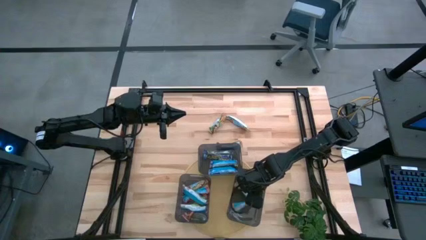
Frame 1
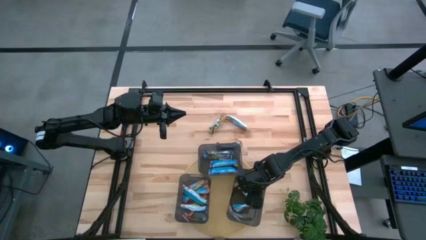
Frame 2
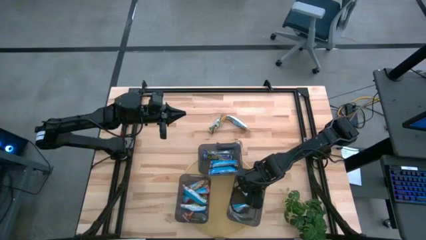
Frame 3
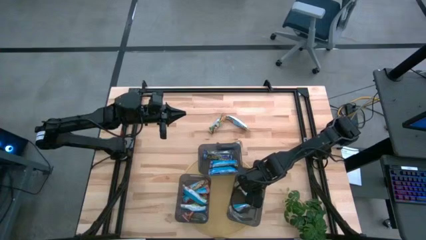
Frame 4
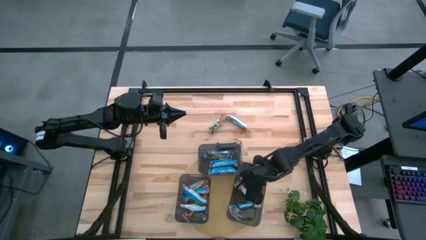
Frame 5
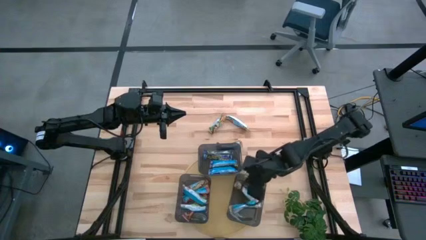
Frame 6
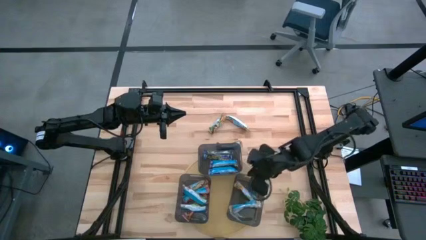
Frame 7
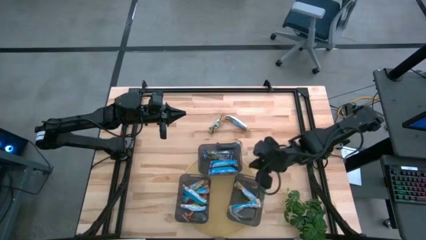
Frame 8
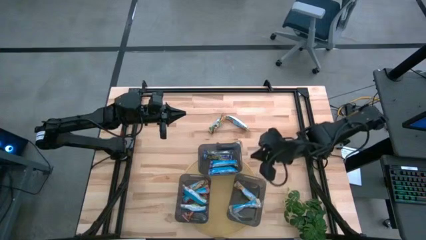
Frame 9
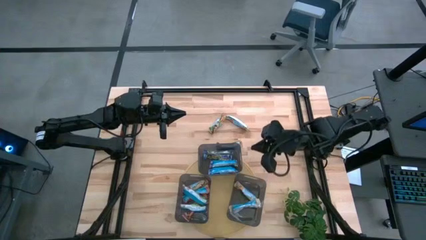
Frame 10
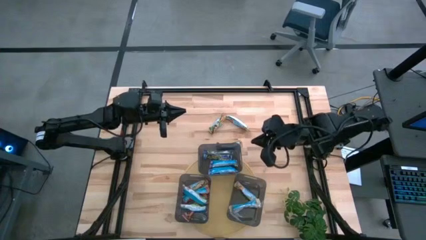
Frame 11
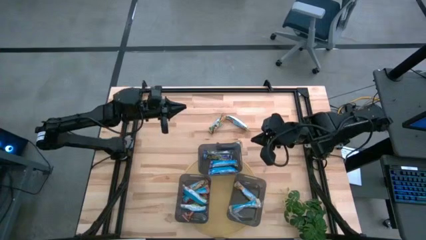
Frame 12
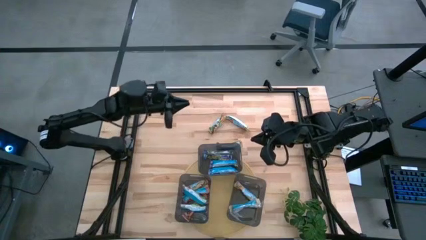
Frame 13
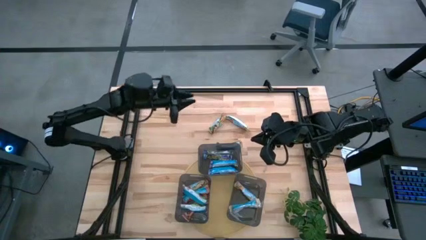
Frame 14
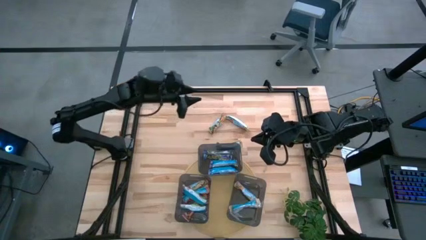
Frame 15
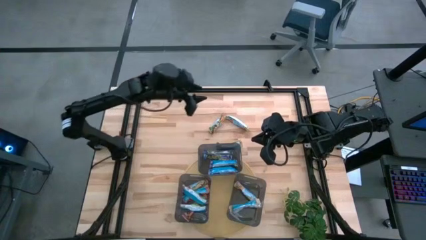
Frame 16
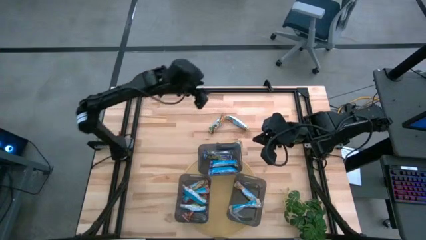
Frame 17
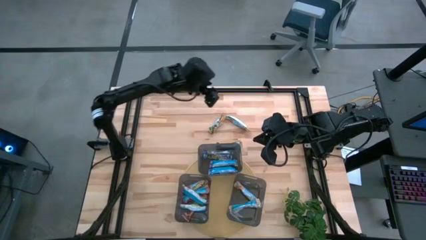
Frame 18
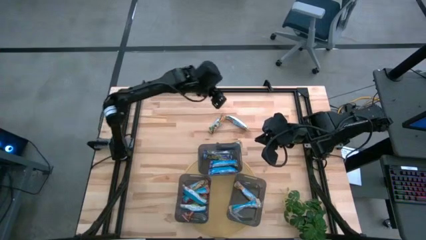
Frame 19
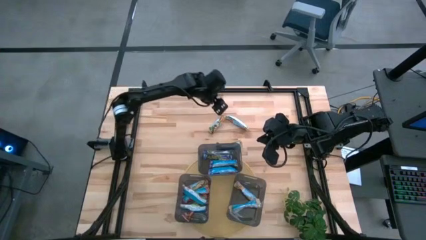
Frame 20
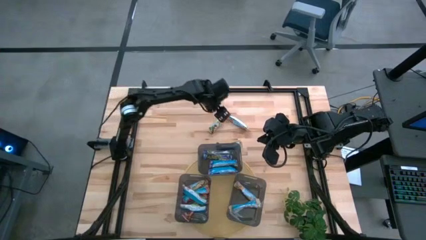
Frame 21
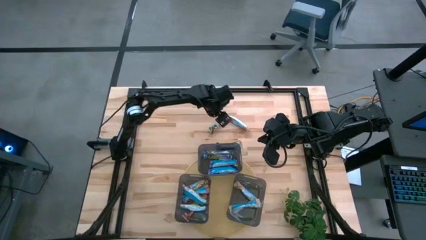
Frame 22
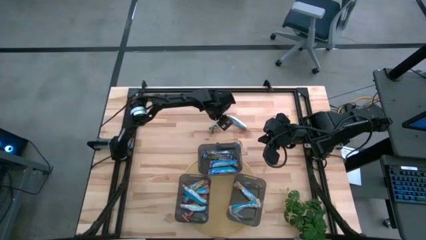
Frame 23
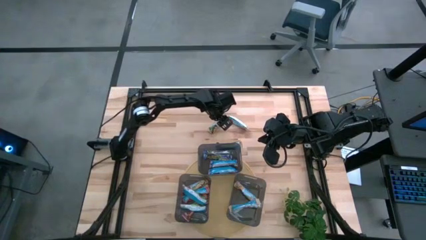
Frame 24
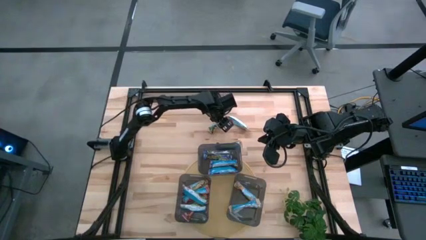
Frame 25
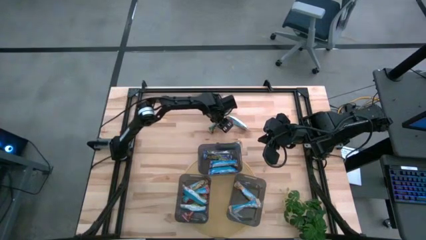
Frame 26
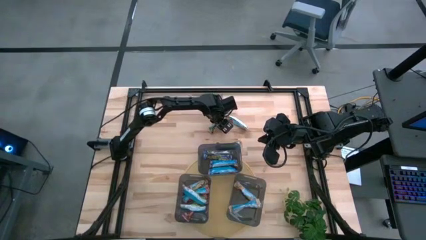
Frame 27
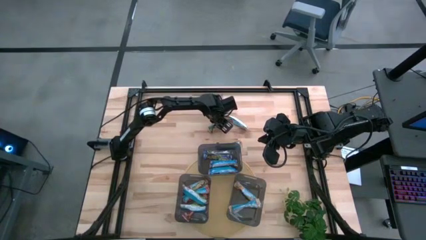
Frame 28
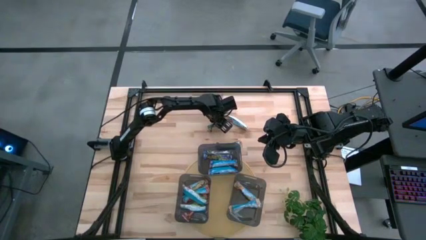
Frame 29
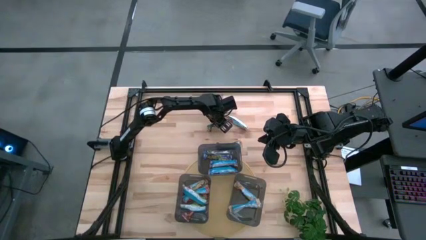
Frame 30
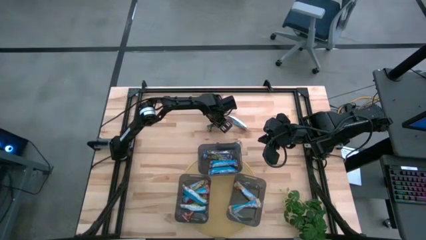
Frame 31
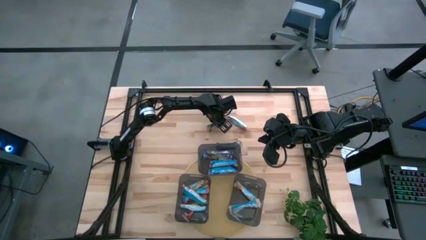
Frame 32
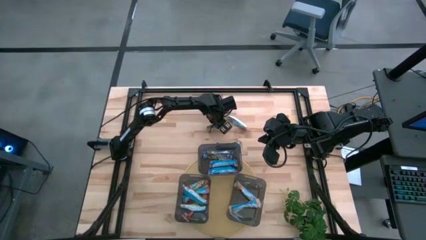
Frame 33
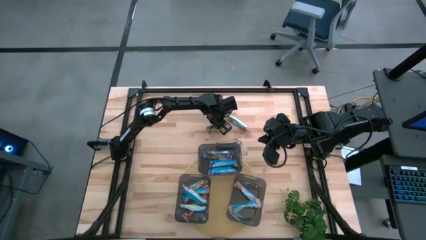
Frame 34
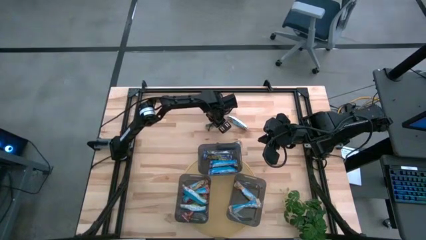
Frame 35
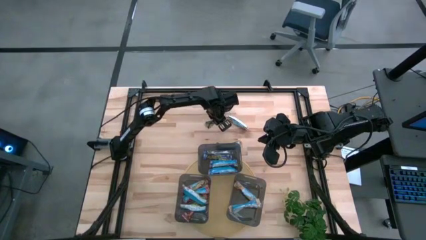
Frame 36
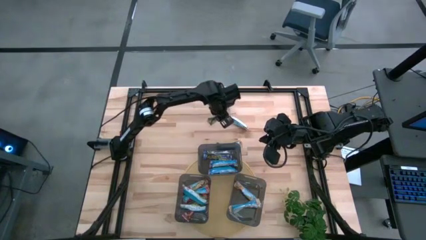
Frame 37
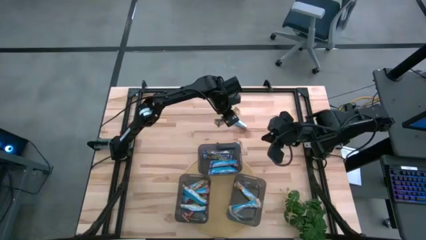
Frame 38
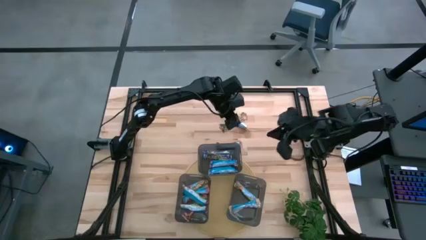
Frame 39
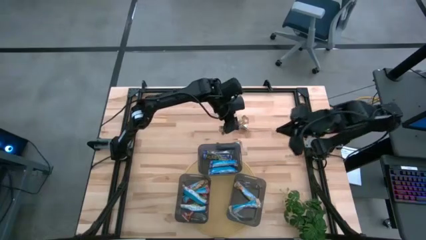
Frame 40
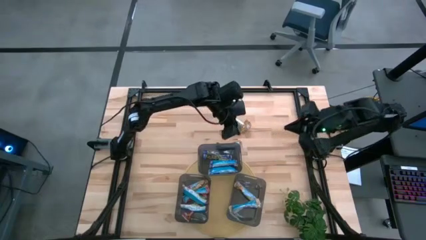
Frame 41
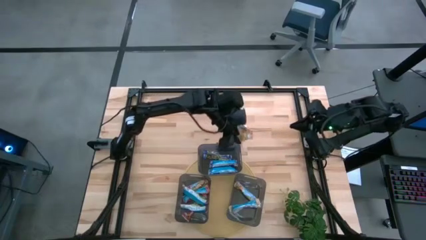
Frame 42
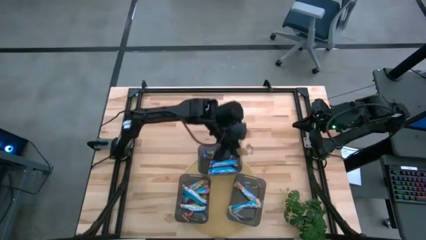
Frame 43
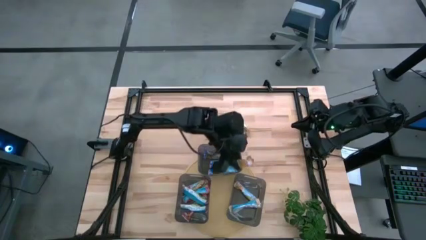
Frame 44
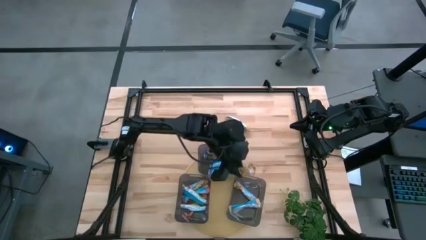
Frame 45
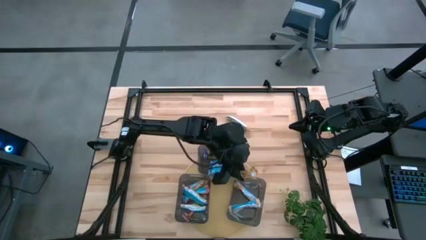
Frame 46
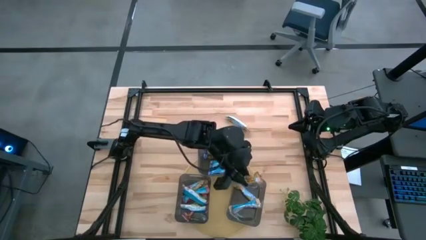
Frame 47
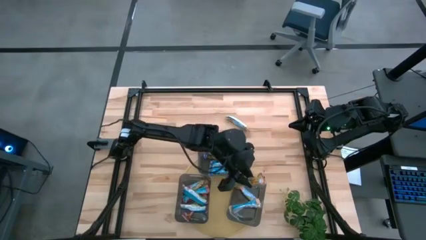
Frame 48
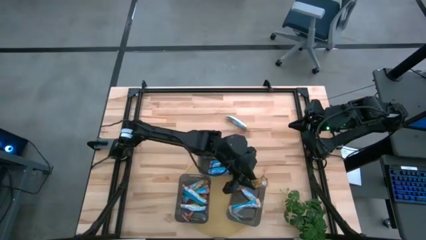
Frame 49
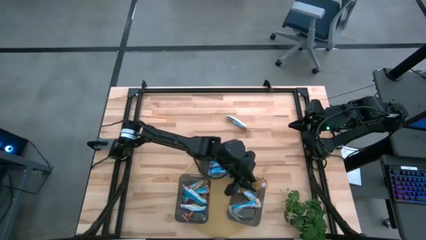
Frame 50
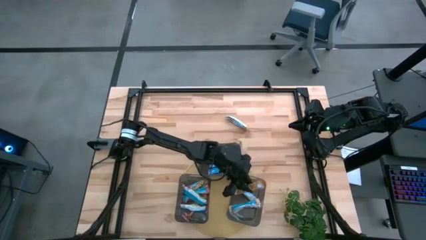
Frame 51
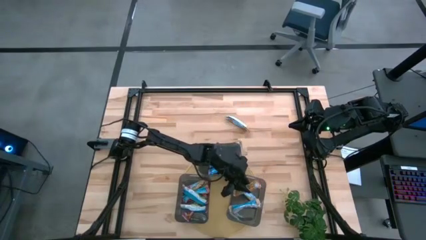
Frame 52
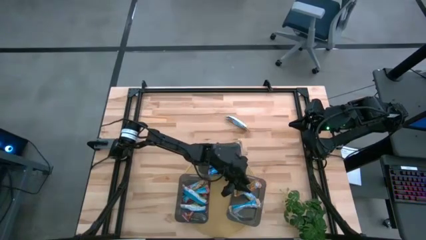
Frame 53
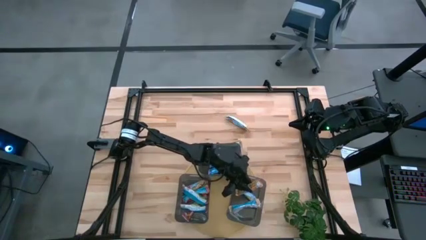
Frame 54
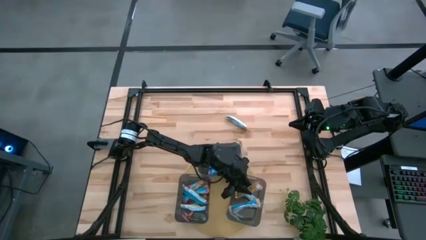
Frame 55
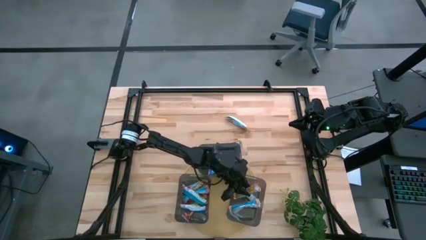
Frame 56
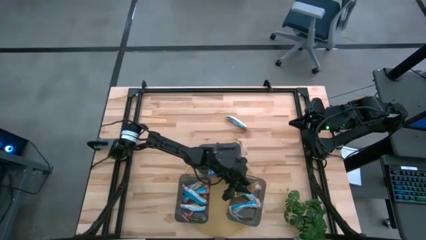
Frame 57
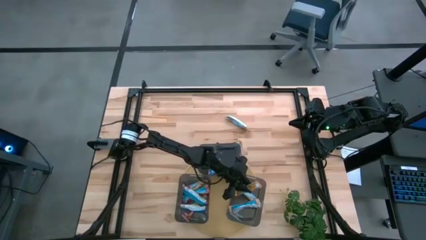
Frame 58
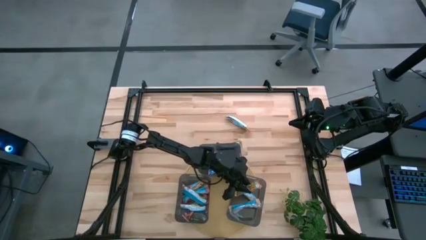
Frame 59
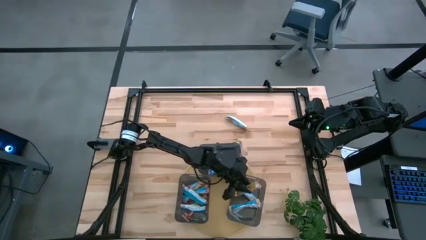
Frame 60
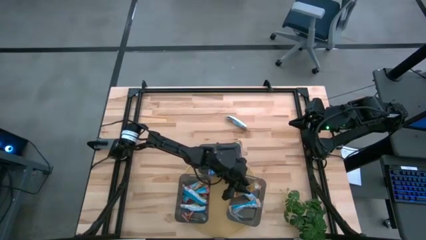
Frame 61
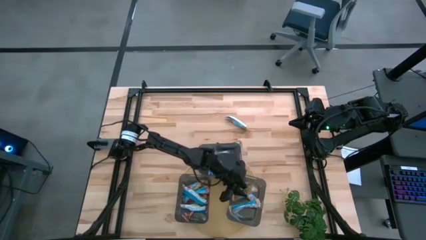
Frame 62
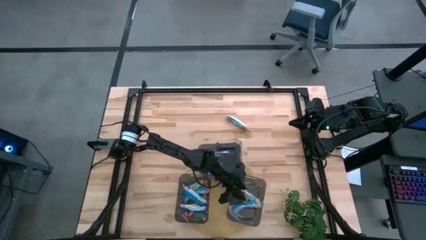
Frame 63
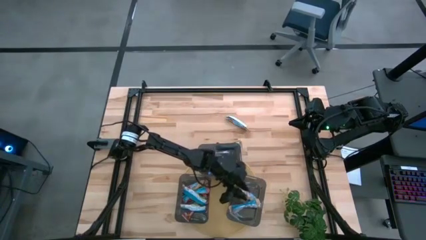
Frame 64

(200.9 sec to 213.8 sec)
Task: Pick and place Granola Bars by type
Put the top left yellow granola bar into the bottom right black bin

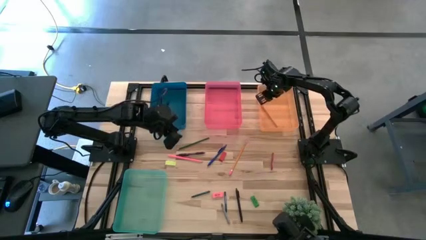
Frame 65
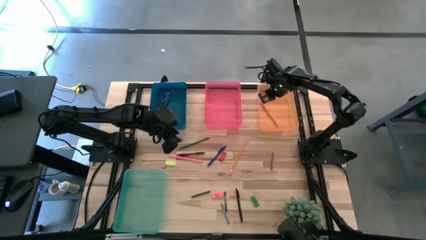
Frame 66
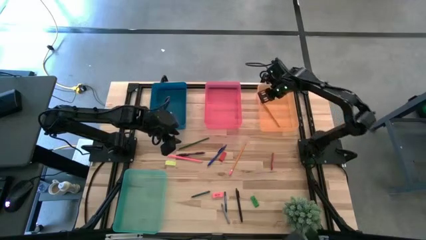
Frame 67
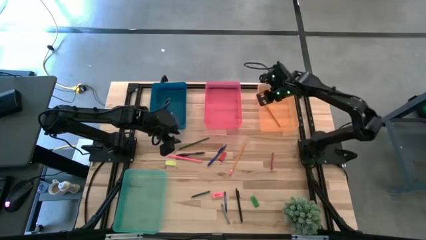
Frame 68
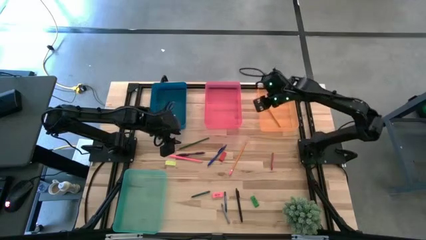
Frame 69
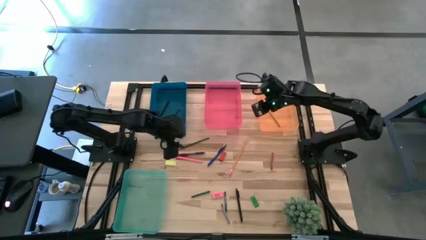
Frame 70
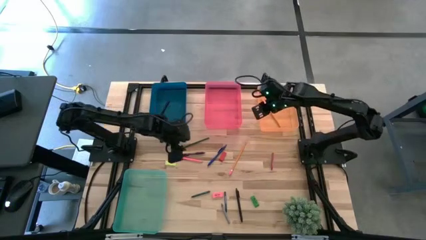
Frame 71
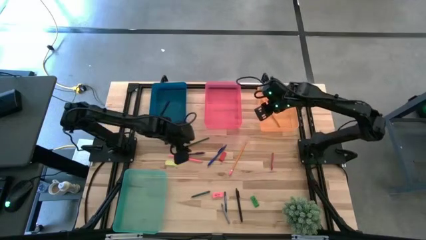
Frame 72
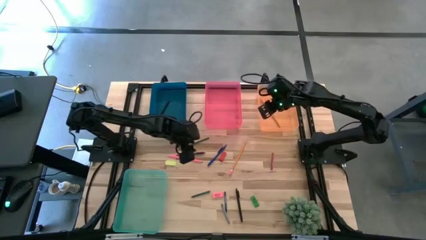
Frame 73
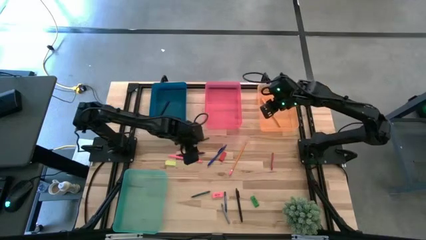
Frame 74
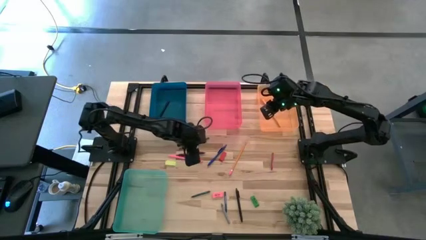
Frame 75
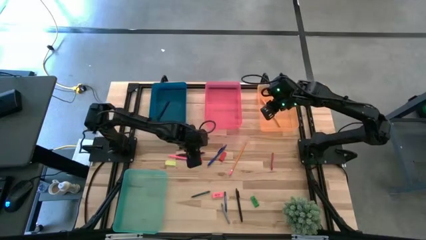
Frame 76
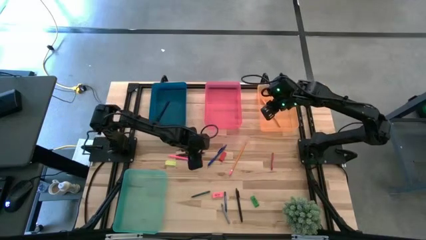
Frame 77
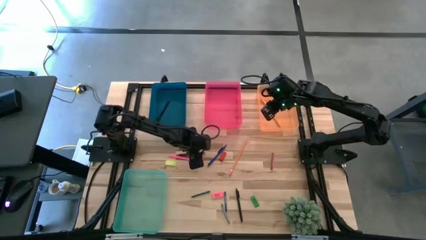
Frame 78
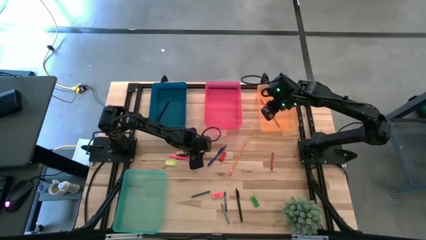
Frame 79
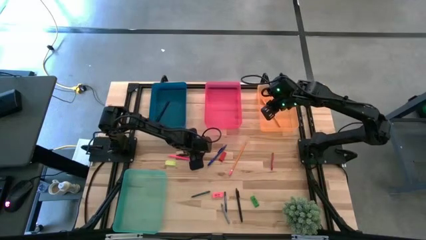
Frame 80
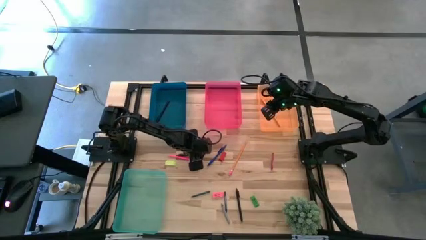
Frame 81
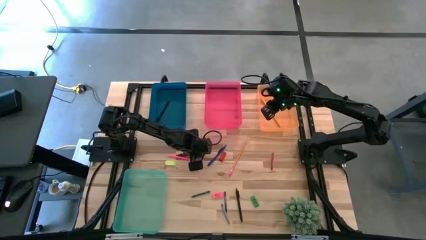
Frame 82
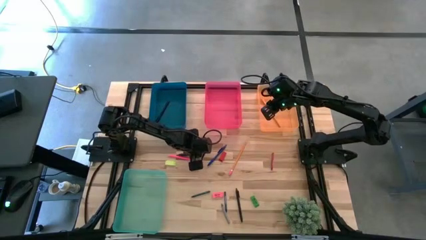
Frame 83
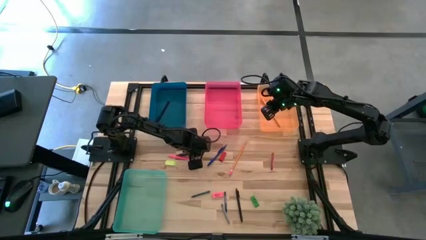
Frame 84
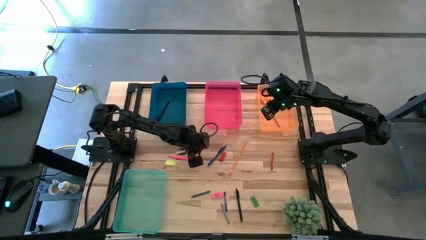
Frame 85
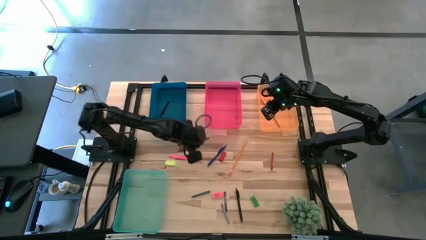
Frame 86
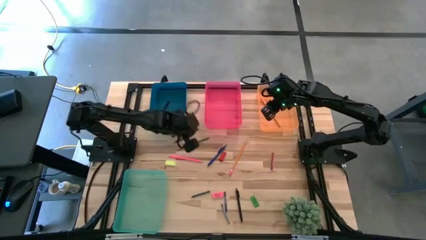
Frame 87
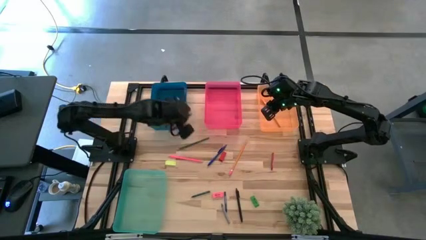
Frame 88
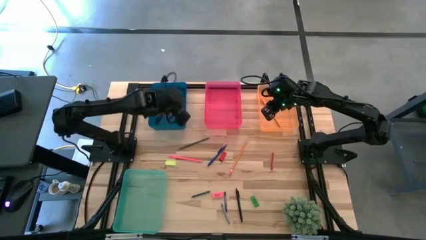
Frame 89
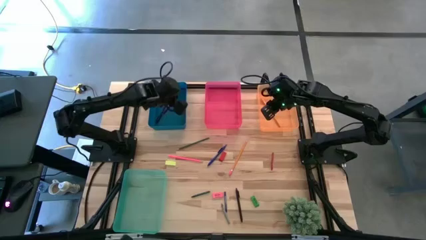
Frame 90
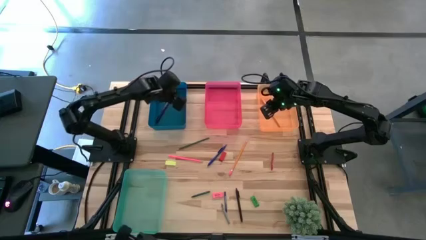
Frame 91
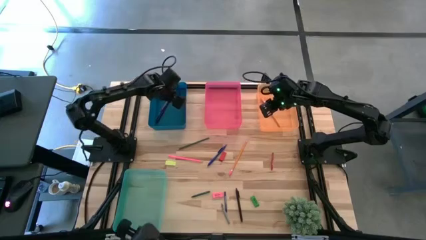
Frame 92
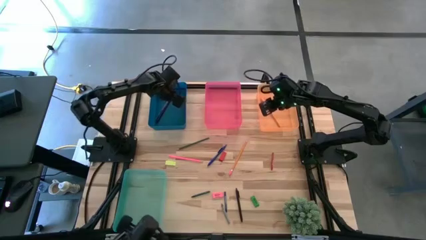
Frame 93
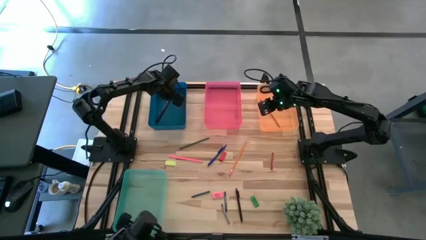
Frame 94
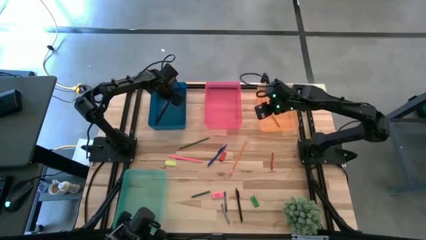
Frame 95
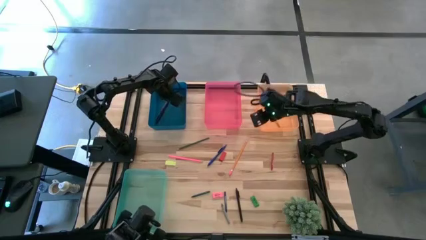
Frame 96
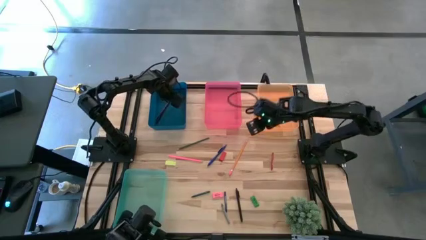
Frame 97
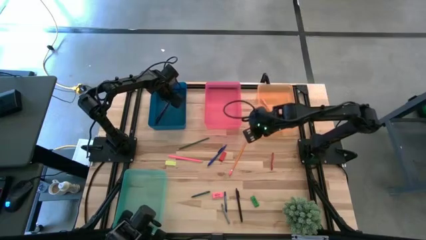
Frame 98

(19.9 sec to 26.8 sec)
Task: Sort crayons/erasers/pens/pencils in bins
Put the violet pen into the blue bin
